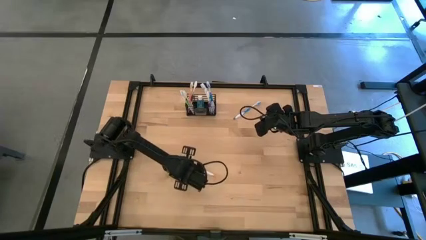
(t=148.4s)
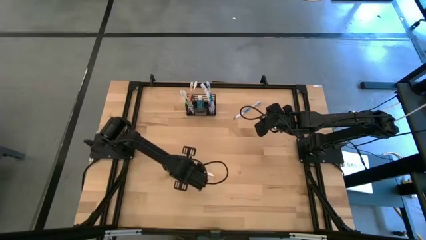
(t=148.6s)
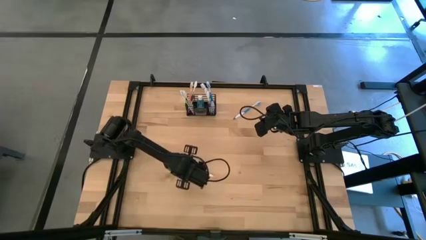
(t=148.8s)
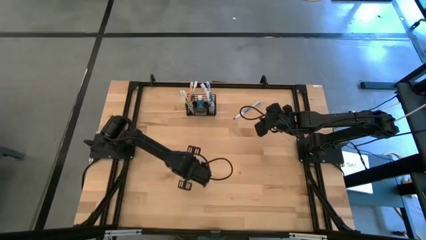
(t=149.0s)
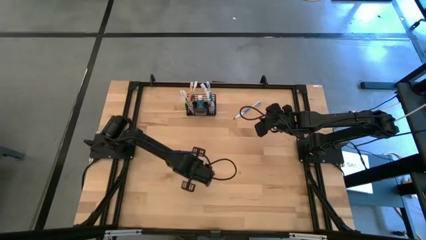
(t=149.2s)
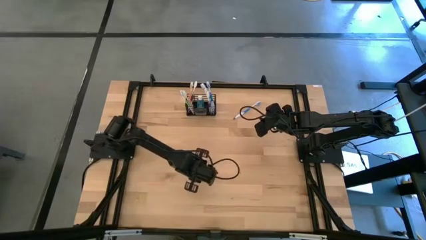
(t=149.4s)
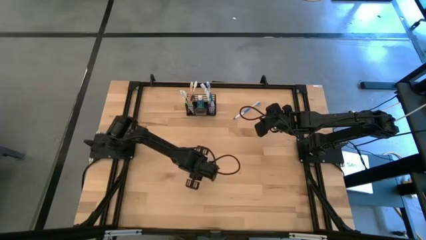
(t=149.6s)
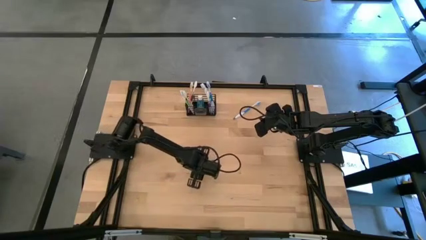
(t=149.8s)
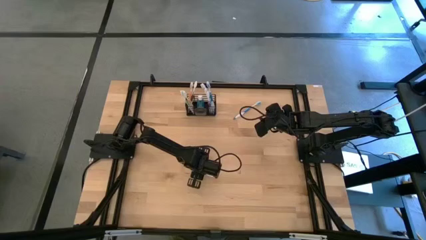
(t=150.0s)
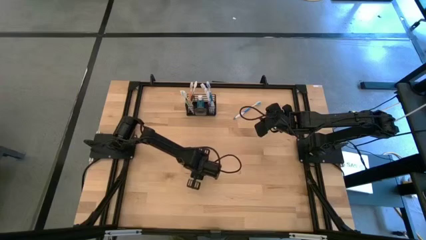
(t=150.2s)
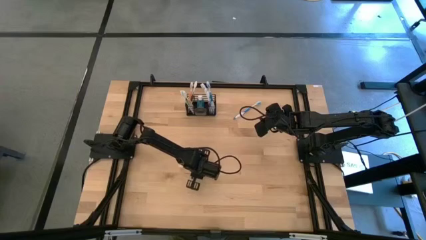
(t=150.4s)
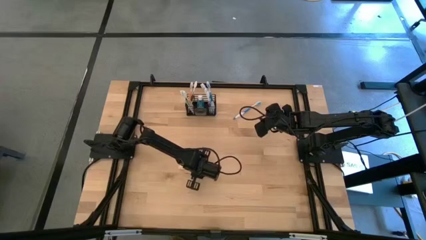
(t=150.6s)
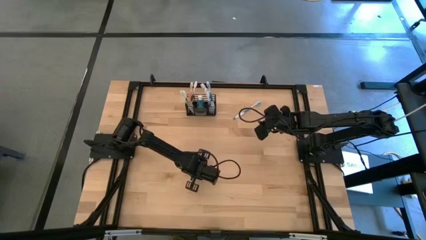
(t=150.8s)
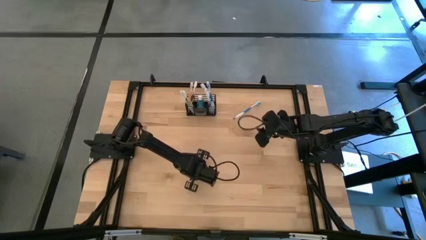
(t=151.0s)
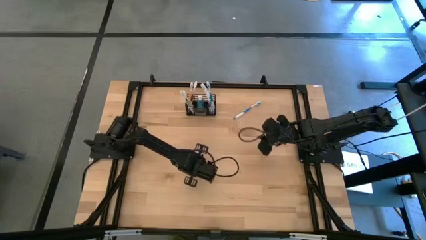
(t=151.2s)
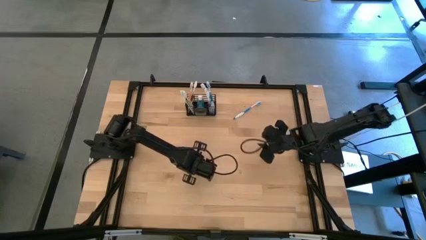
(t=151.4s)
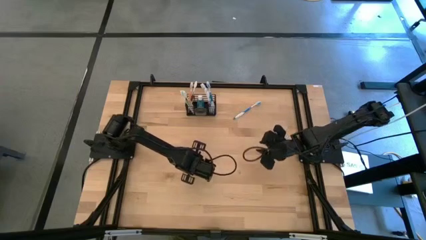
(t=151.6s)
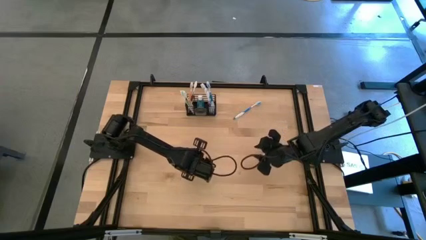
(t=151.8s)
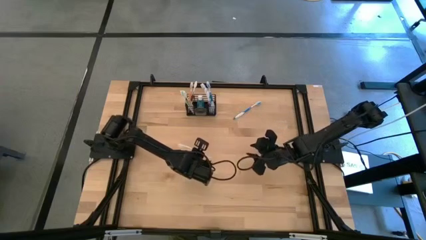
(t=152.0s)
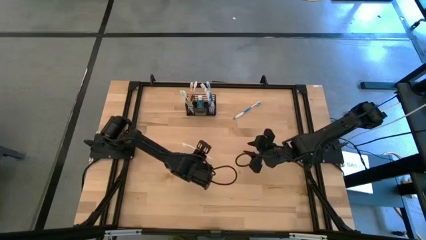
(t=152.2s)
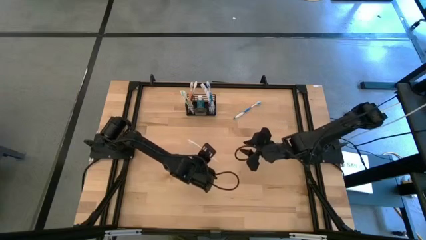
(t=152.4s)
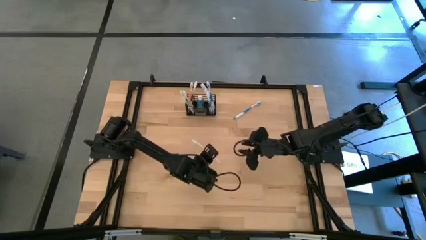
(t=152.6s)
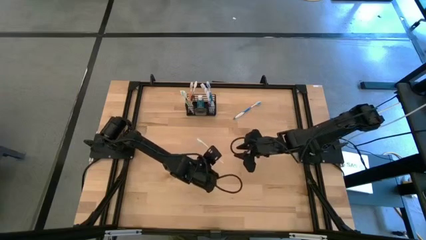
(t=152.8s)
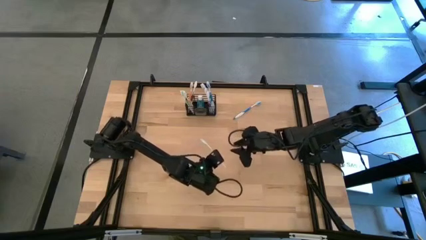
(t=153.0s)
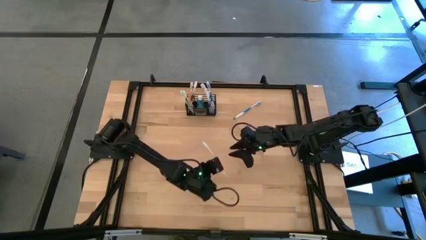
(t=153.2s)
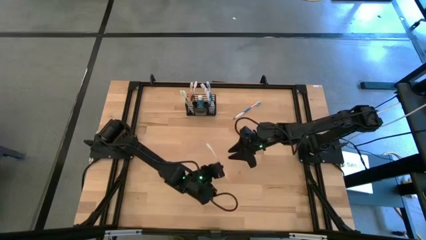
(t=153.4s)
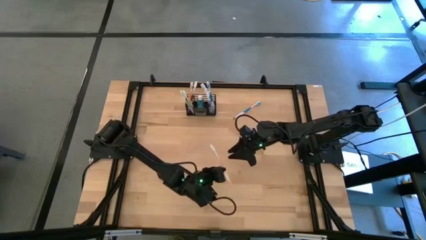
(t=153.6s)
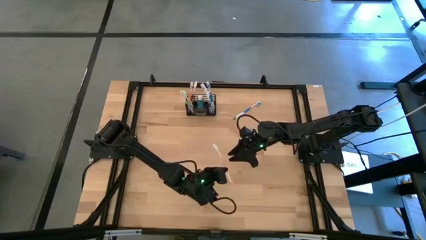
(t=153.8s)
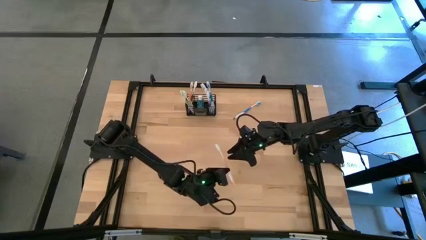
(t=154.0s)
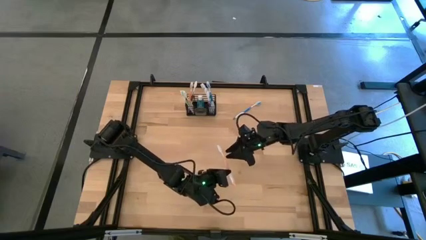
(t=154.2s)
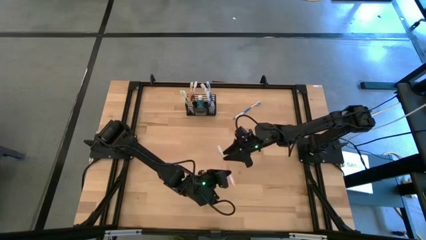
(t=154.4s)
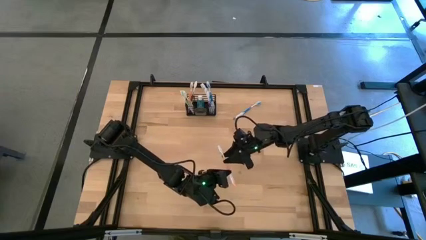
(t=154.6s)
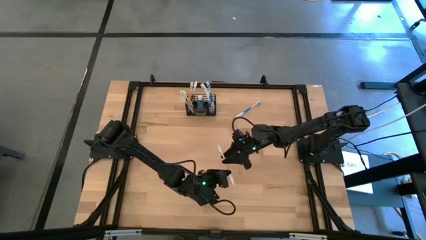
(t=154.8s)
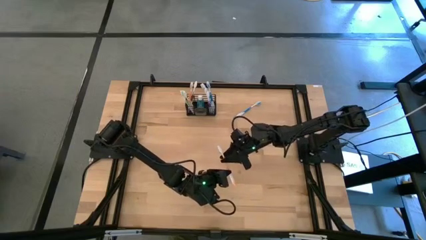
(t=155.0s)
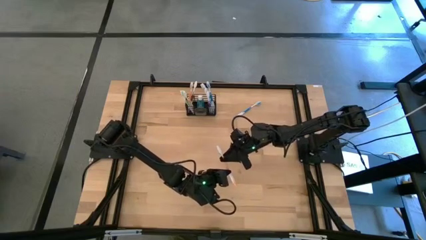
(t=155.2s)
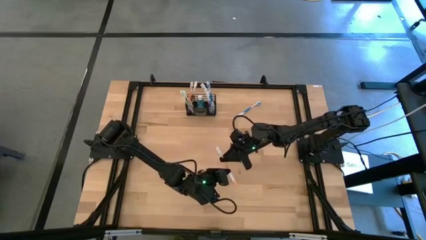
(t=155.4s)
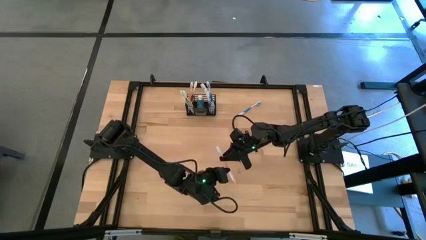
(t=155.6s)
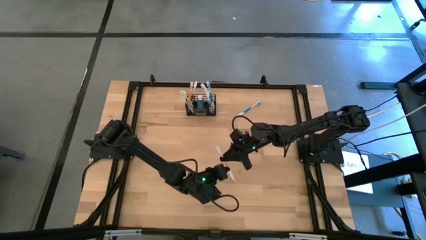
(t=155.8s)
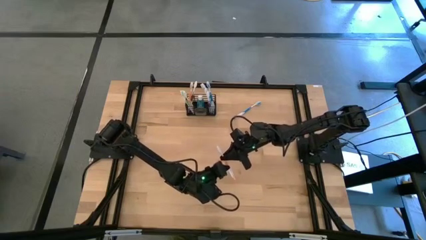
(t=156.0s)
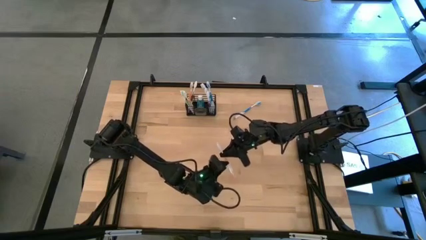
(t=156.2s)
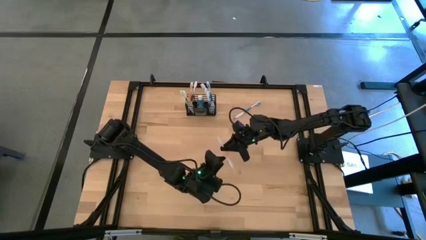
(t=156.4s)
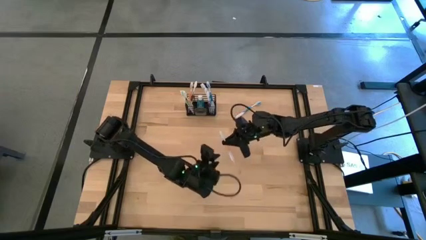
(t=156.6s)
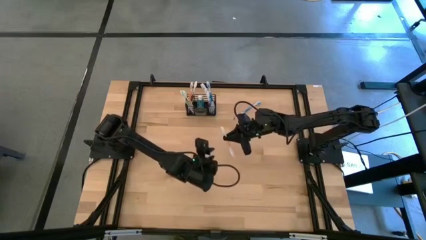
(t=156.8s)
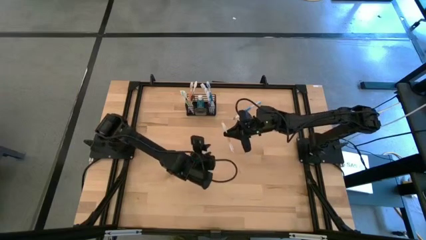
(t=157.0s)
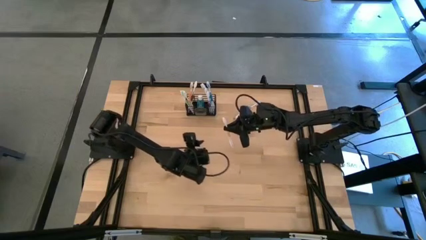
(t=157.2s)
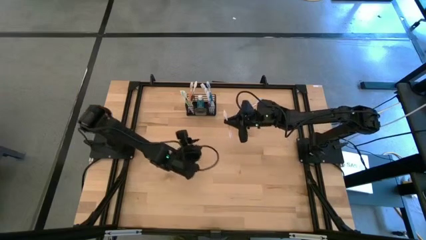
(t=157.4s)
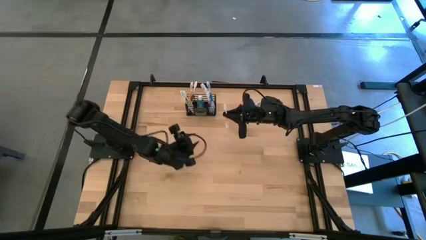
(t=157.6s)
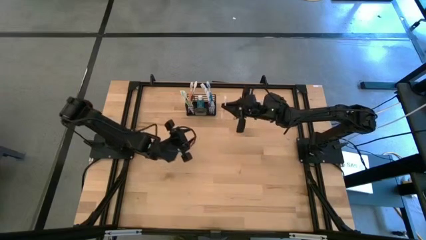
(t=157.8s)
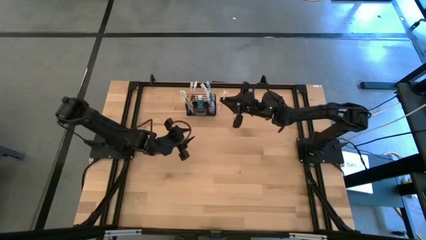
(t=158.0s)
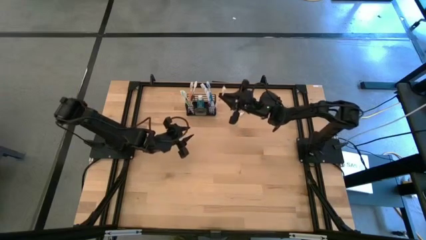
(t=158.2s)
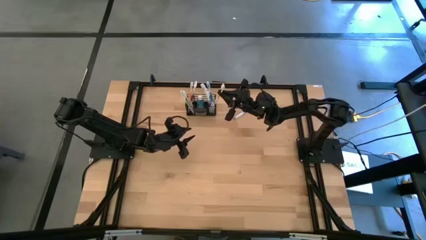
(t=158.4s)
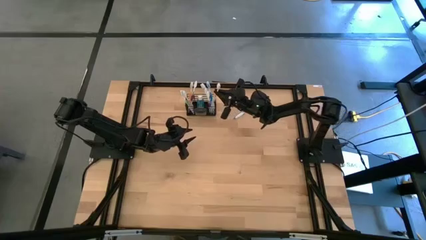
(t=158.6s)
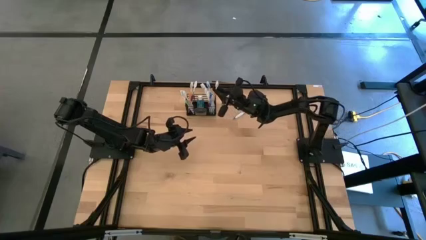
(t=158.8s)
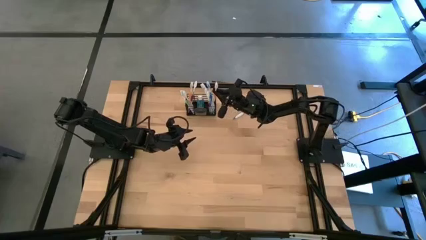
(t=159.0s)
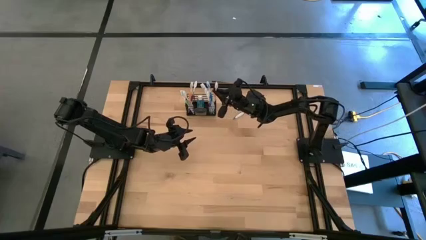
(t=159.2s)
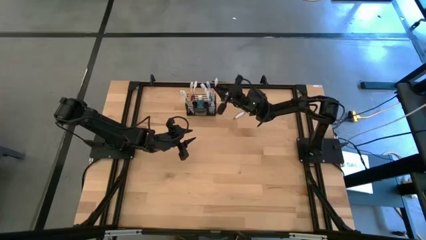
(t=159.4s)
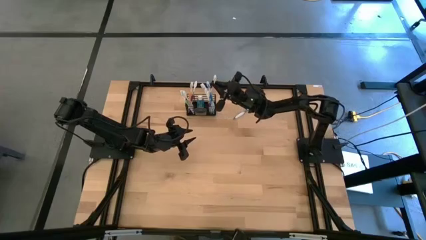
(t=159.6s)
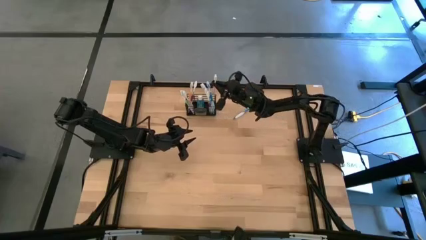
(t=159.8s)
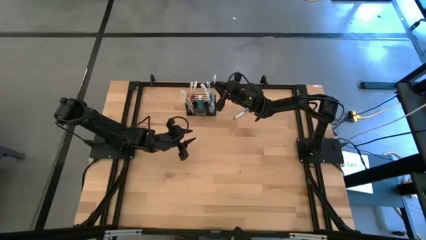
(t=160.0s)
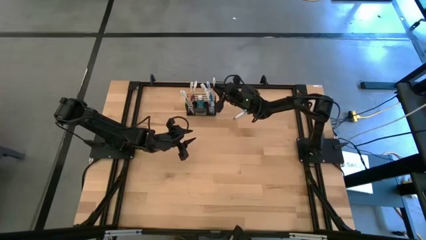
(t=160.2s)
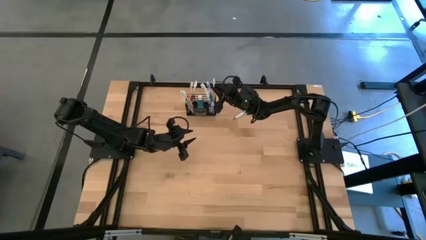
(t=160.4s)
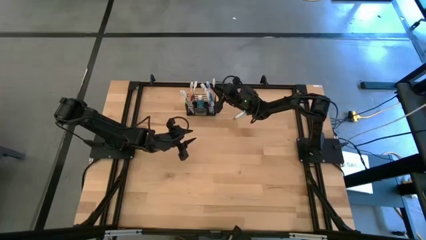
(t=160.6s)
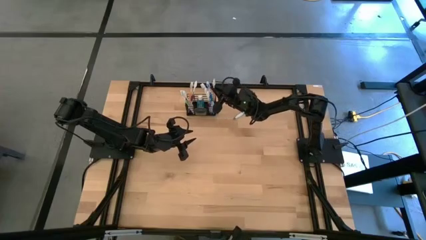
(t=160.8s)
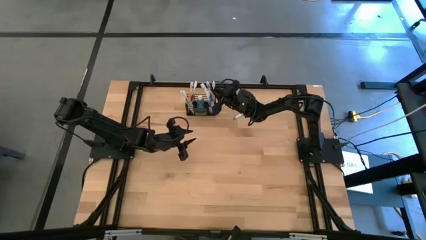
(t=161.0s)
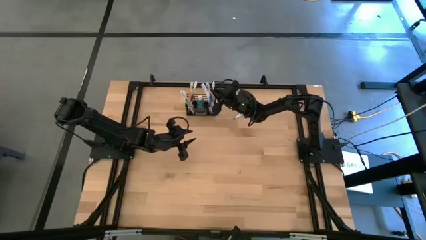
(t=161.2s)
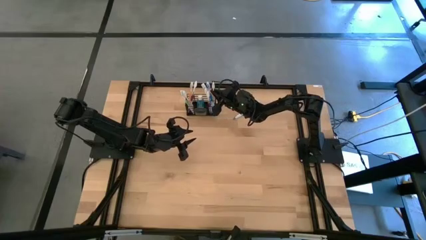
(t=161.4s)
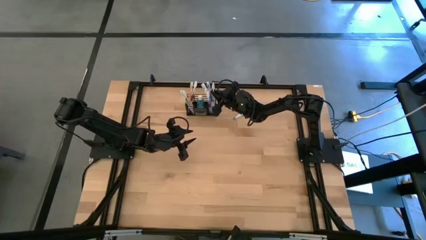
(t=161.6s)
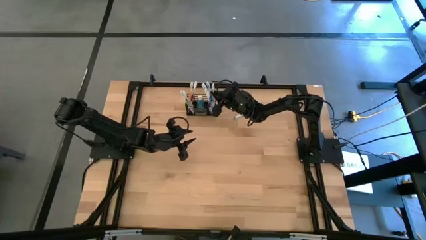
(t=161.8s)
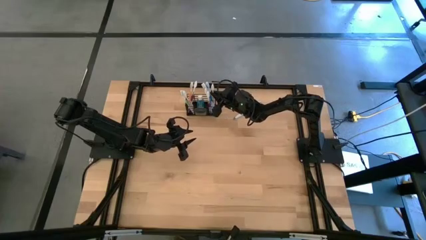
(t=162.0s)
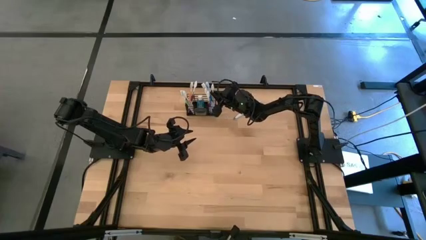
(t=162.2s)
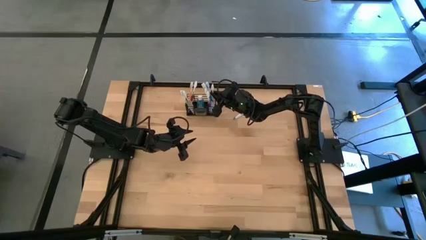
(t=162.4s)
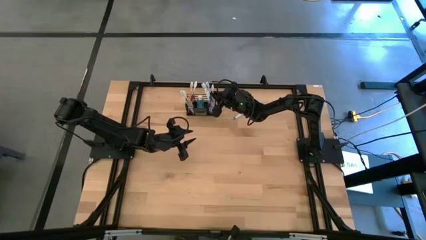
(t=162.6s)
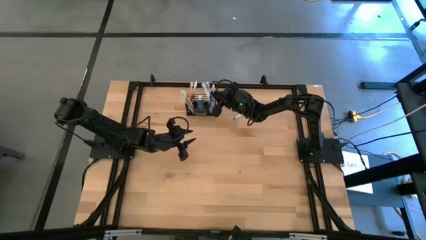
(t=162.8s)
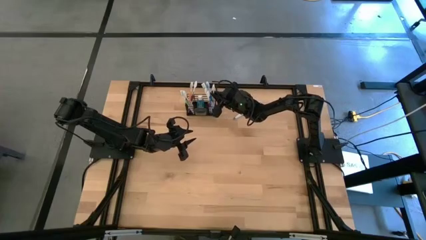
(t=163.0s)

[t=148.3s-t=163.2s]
Task: Pick & Place toothbrushing station
Put the orange toothbrush into the black wire organizer
